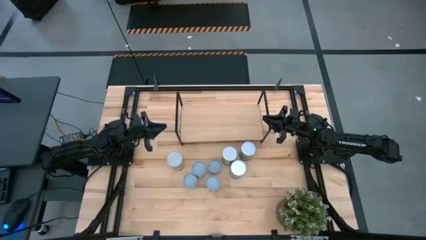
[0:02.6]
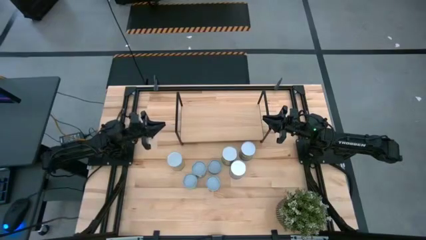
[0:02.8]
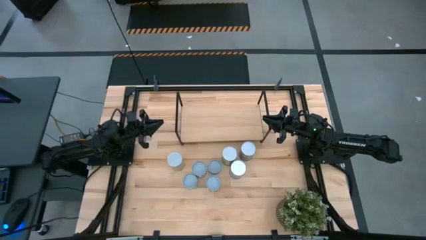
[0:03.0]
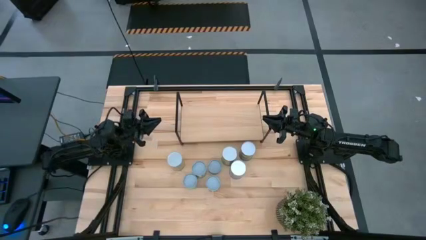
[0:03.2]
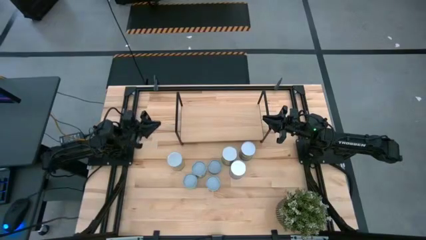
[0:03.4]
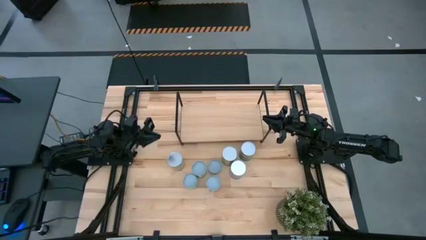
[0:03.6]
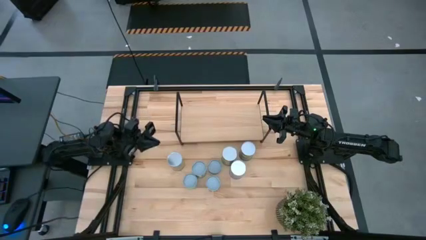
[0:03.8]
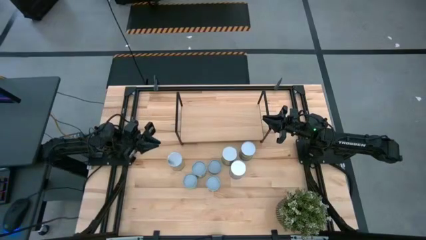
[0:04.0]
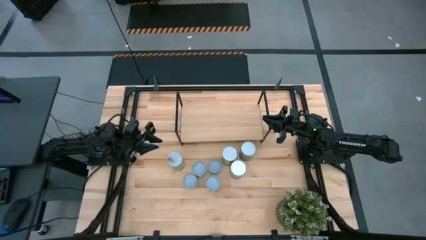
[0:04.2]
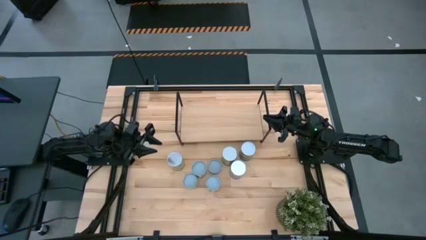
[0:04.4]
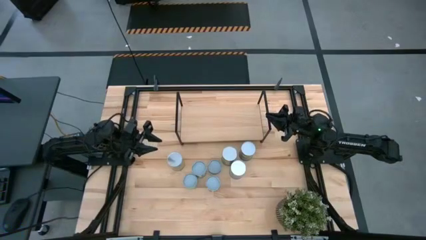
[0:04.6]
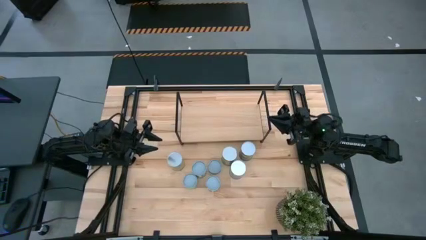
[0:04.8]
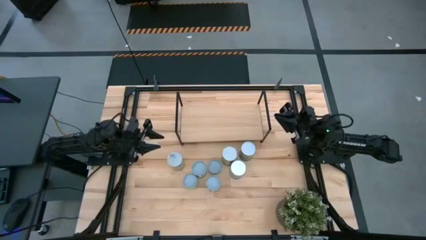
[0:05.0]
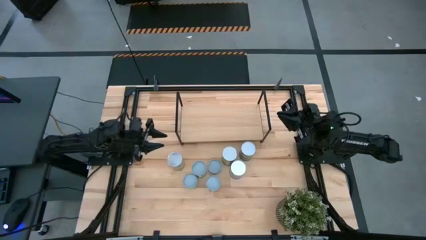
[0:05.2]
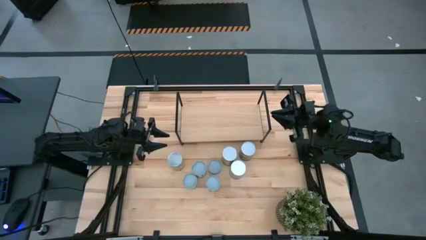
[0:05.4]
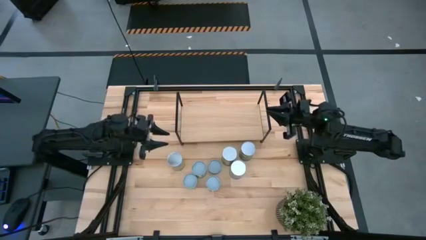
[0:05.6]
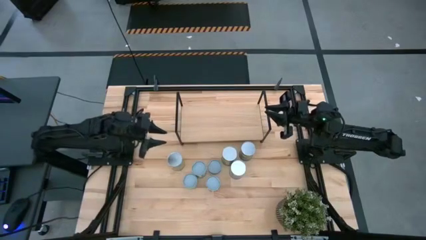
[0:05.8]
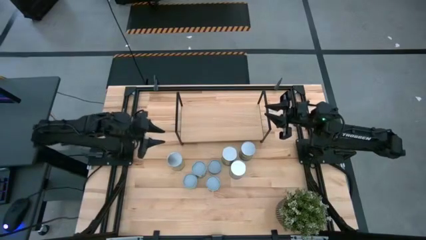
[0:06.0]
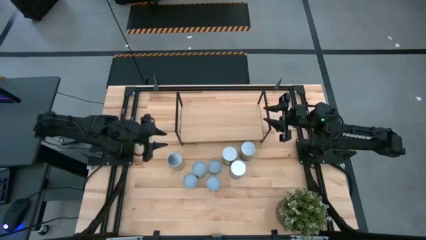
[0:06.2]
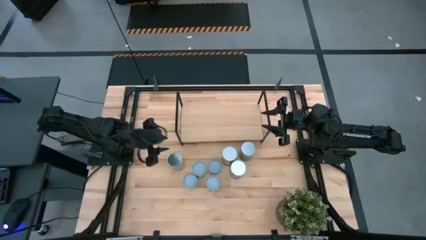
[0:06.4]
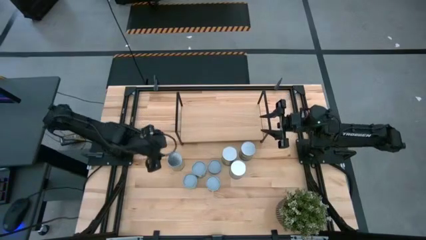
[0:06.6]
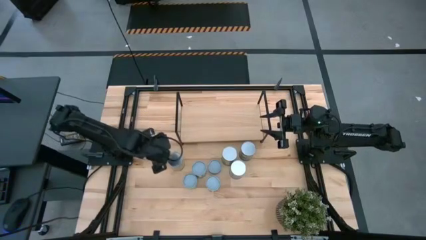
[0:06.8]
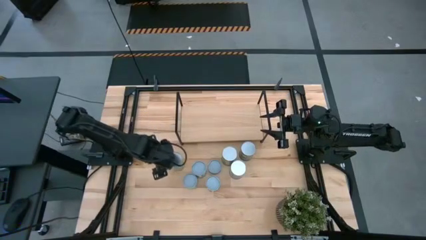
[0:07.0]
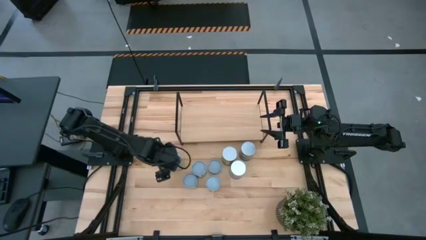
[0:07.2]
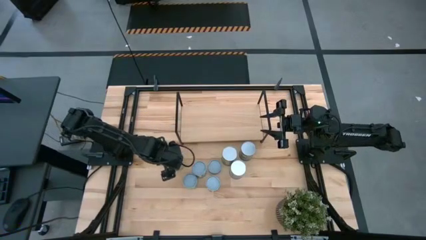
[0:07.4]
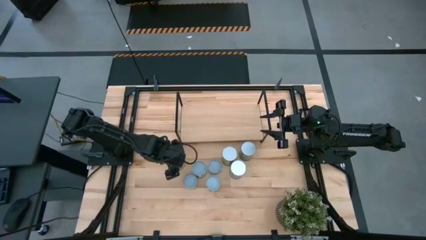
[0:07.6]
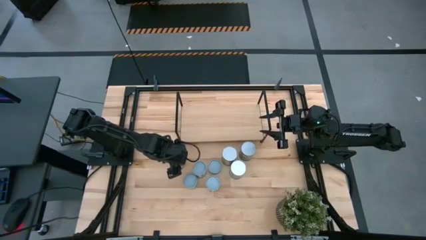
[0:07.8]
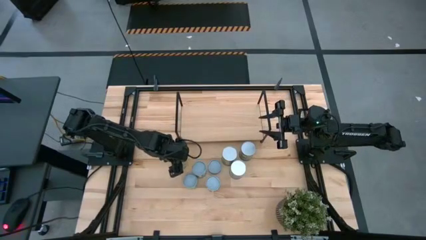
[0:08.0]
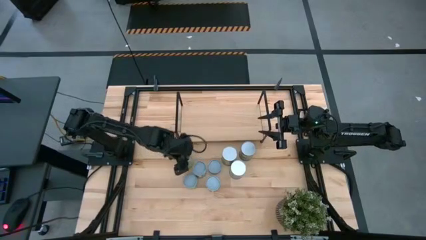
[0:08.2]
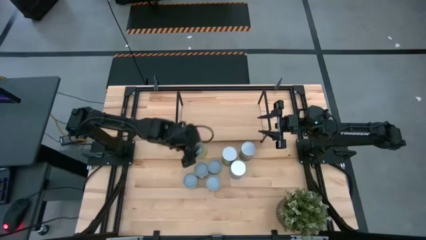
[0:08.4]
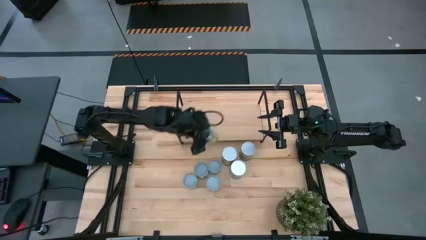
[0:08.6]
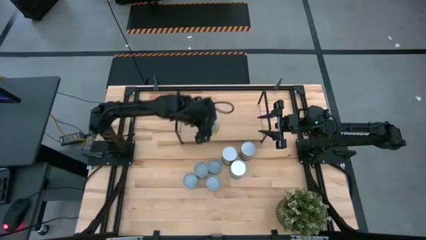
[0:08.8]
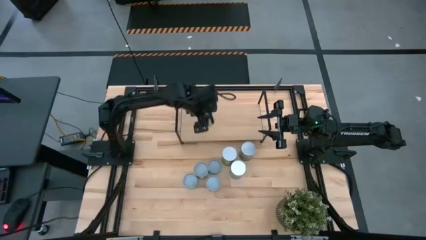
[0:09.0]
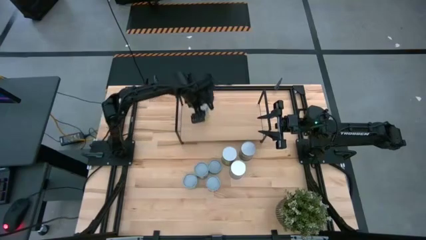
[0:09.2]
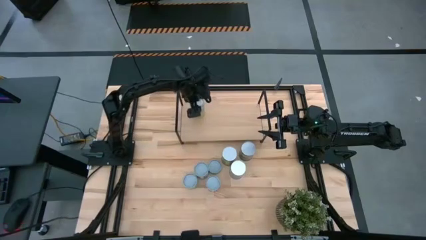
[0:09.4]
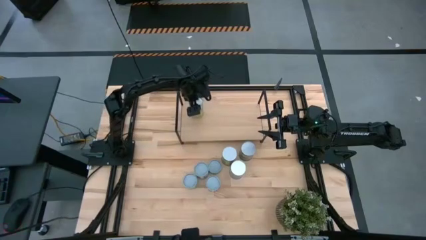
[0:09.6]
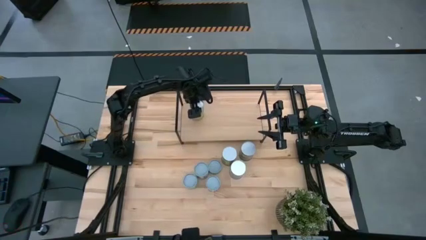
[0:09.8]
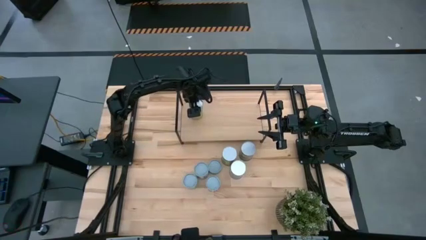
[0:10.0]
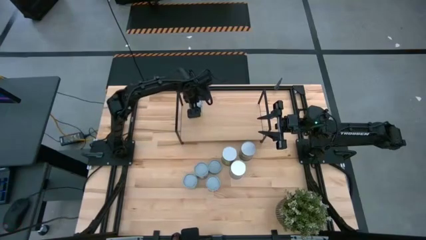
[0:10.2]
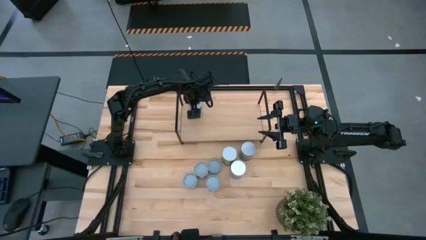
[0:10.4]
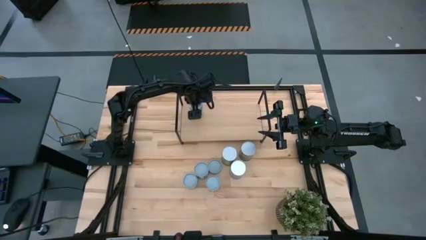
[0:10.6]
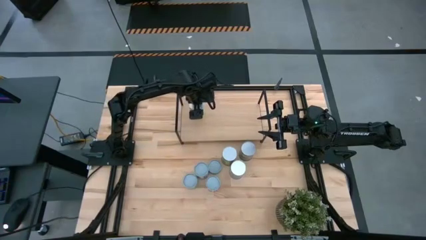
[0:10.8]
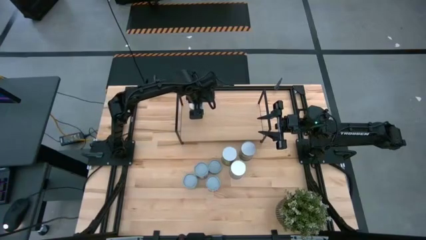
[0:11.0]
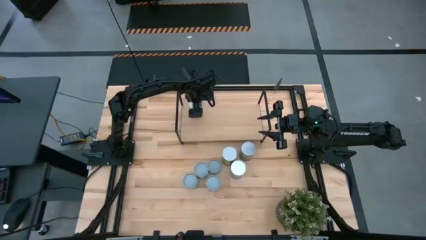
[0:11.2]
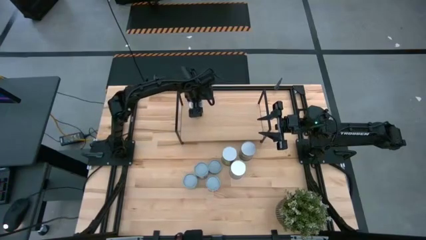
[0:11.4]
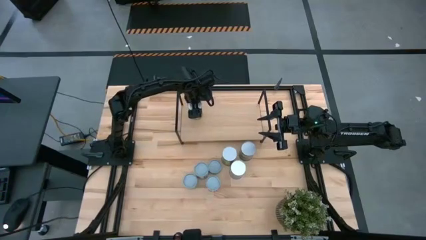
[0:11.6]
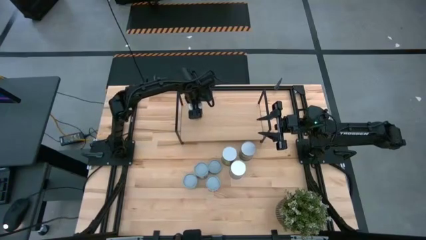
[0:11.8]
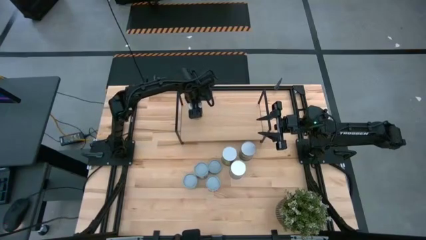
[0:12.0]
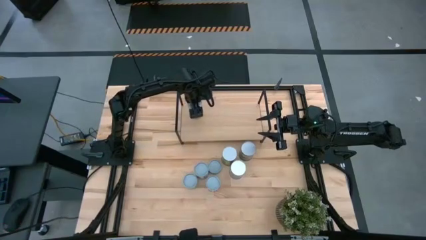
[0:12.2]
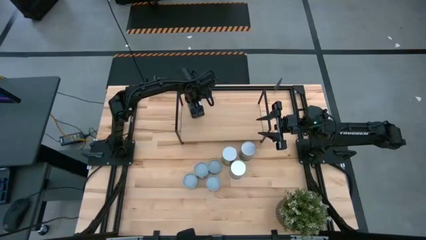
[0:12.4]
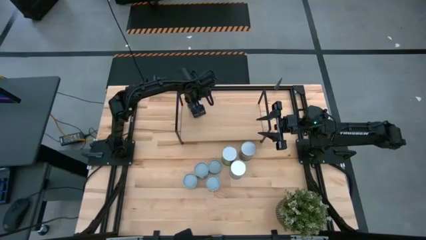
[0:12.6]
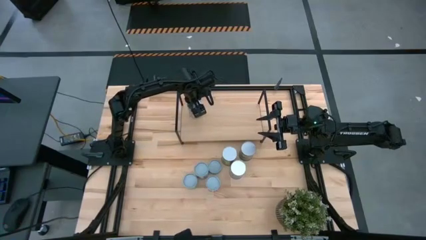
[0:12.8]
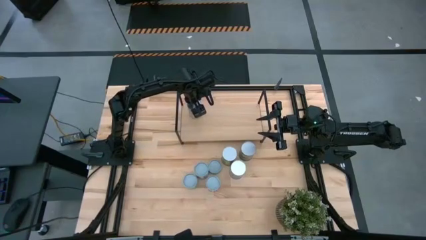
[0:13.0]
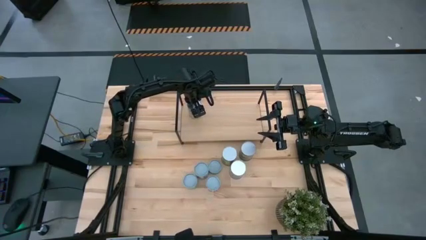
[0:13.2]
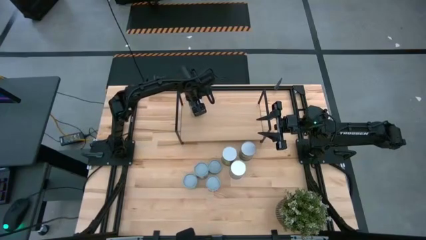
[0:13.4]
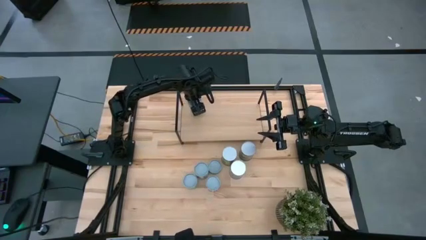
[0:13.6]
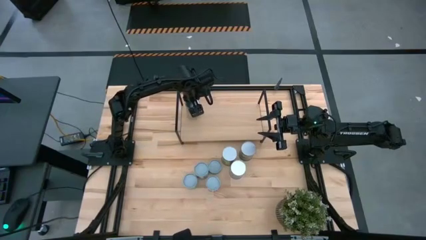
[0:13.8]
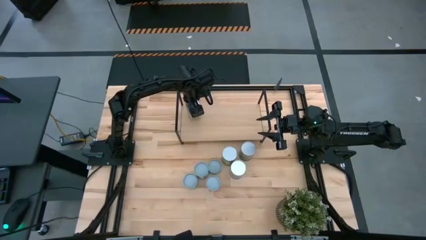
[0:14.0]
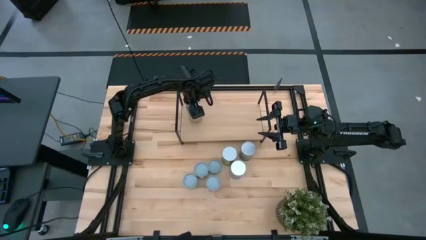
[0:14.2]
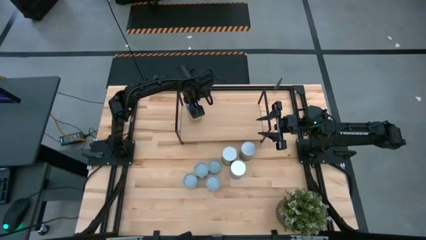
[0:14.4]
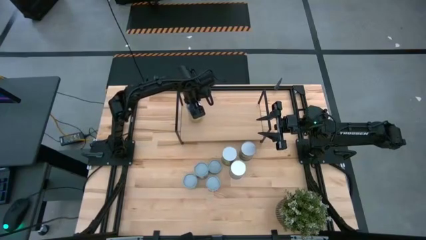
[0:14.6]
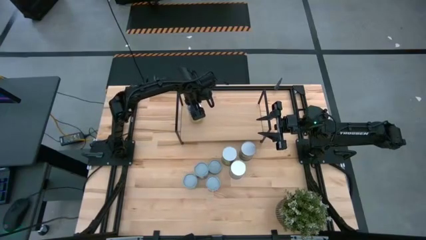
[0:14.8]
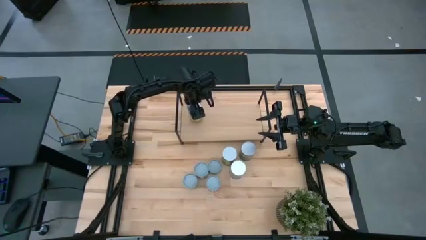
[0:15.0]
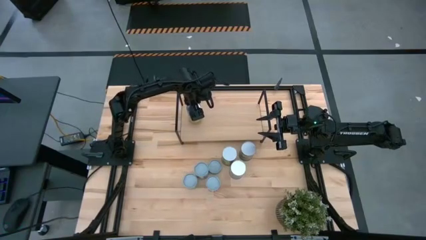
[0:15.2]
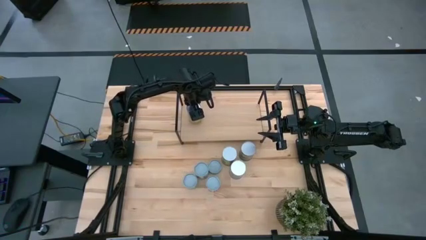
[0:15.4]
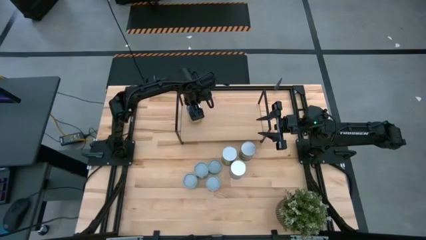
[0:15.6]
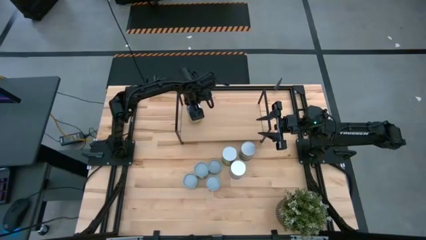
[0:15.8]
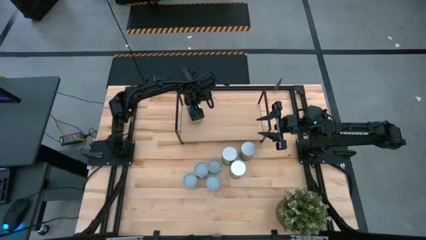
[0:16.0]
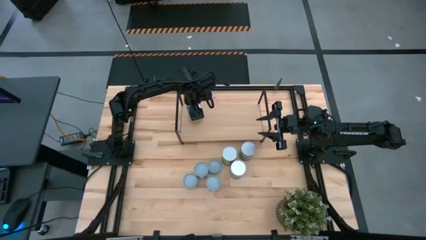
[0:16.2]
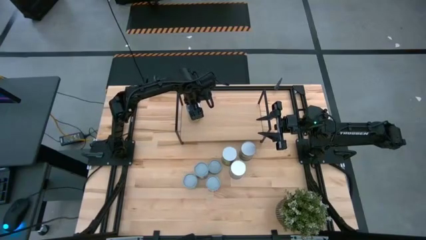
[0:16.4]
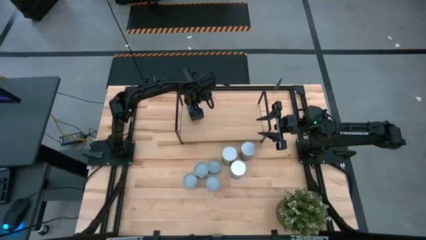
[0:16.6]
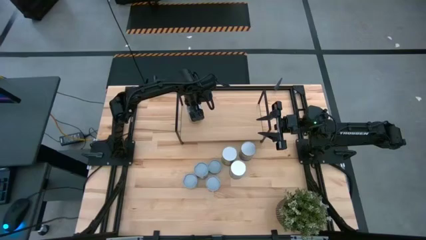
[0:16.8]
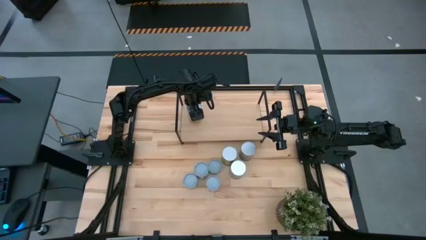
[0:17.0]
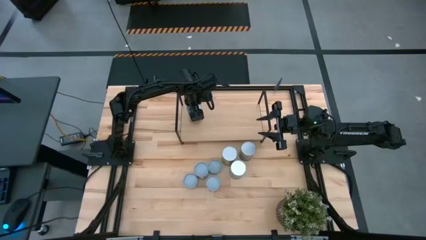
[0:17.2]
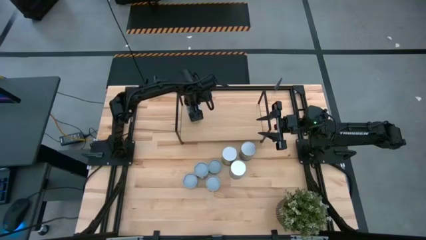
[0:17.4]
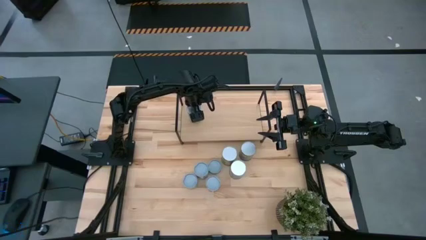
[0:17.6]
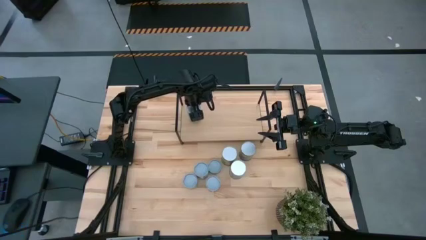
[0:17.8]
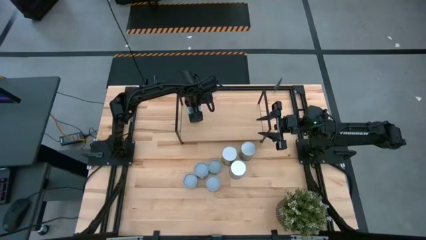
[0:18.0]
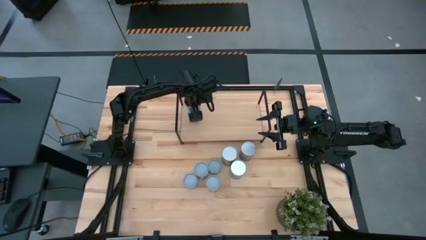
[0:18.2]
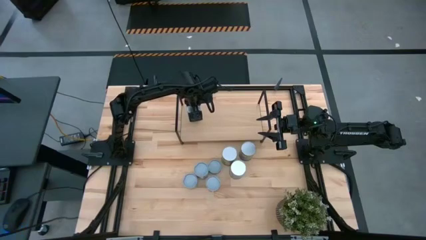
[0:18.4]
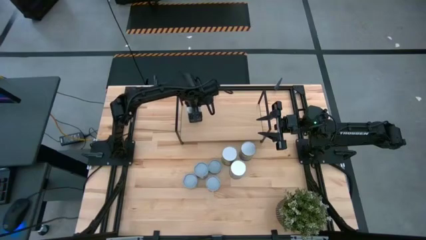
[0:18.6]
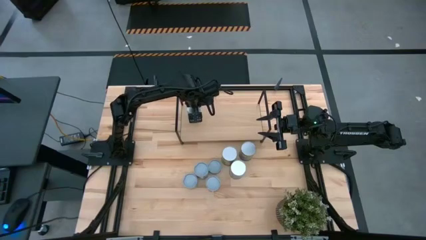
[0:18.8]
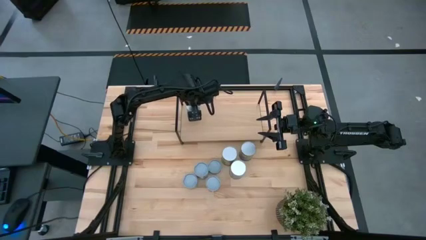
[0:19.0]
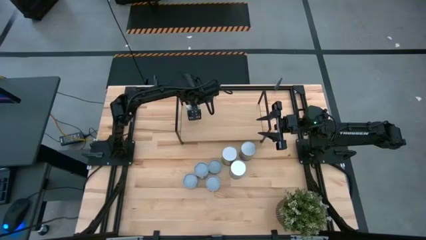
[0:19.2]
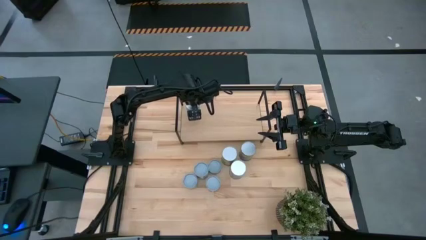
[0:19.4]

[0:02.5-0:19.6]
Task: Pick and place cans onto a shelf
Put the canned carrots on the shelf
